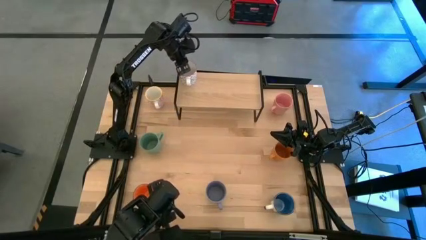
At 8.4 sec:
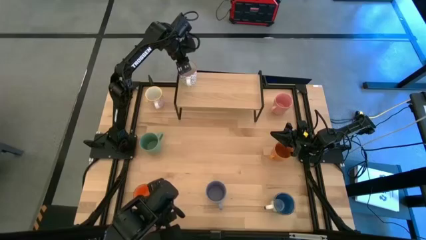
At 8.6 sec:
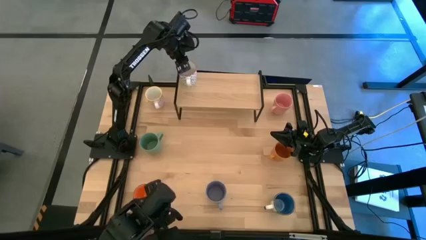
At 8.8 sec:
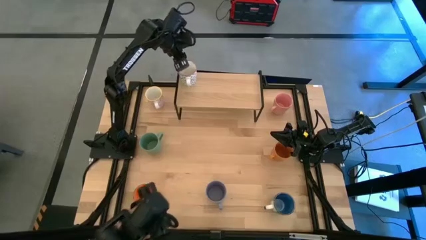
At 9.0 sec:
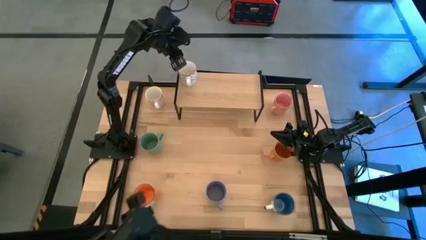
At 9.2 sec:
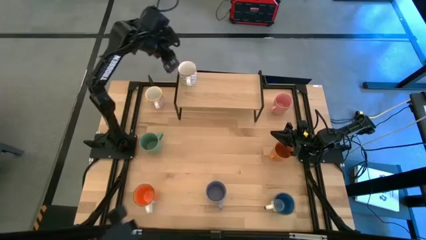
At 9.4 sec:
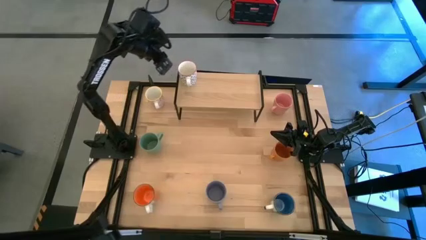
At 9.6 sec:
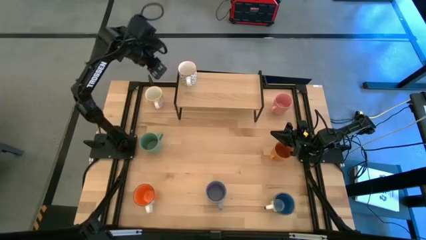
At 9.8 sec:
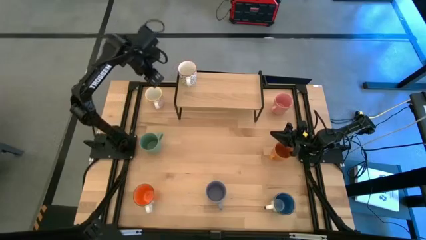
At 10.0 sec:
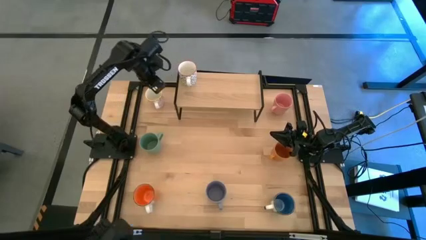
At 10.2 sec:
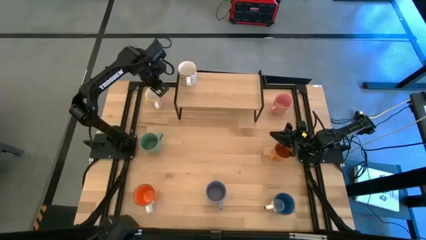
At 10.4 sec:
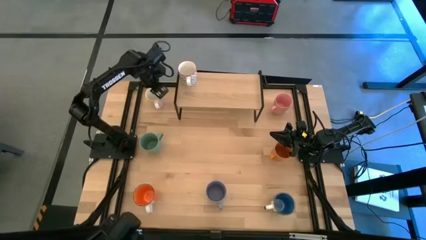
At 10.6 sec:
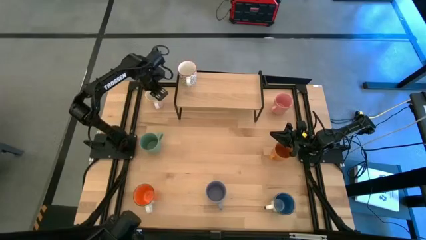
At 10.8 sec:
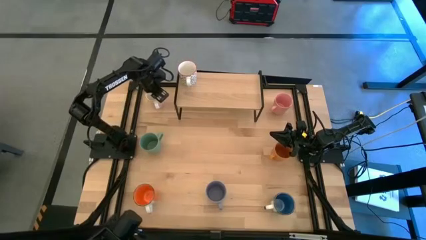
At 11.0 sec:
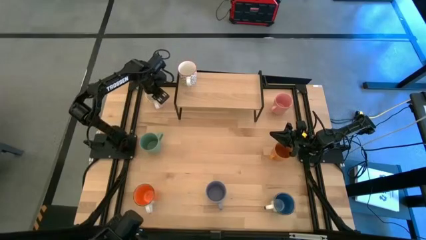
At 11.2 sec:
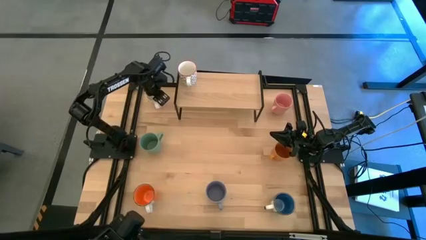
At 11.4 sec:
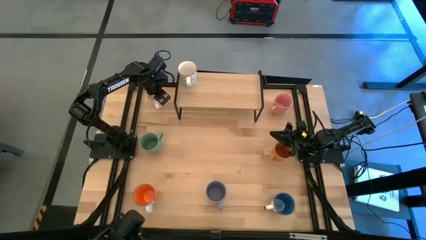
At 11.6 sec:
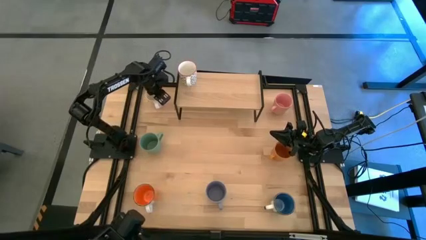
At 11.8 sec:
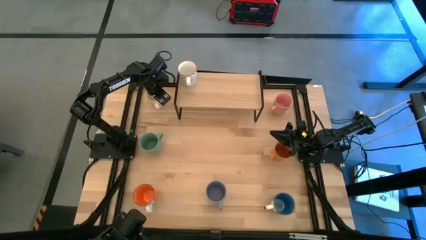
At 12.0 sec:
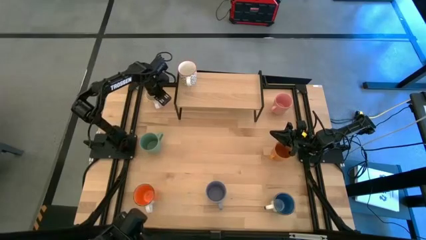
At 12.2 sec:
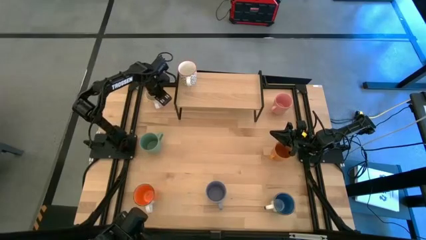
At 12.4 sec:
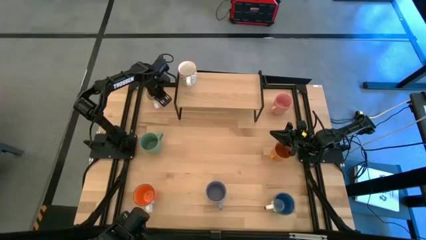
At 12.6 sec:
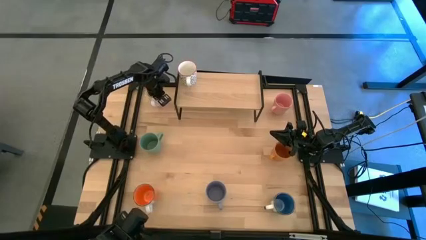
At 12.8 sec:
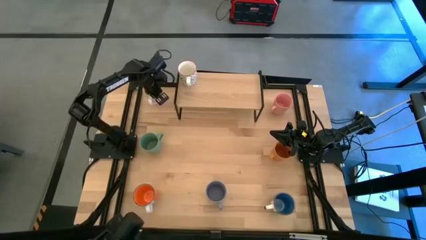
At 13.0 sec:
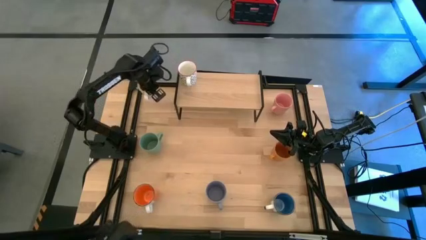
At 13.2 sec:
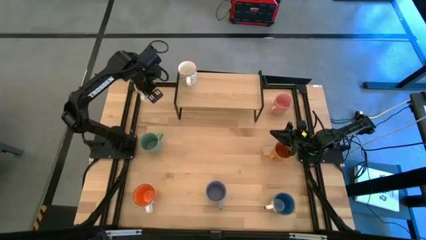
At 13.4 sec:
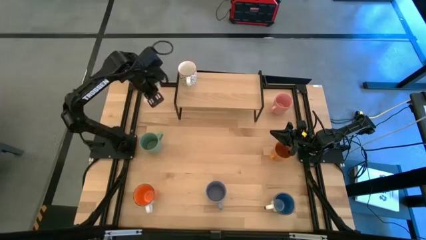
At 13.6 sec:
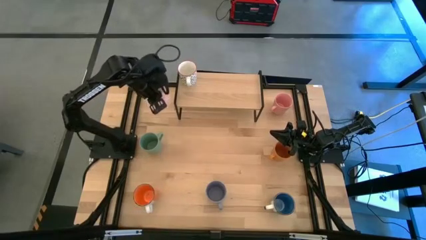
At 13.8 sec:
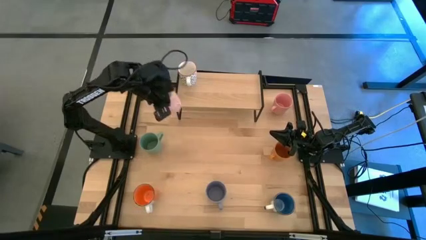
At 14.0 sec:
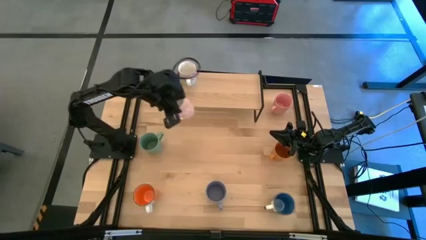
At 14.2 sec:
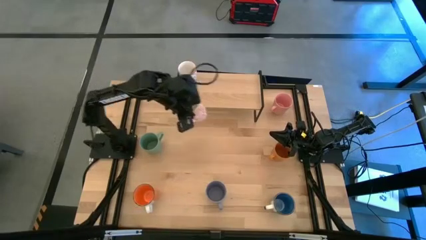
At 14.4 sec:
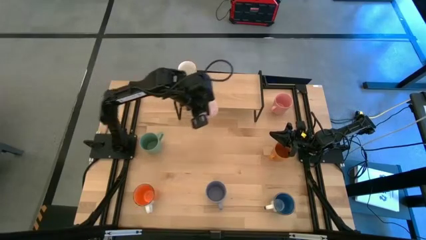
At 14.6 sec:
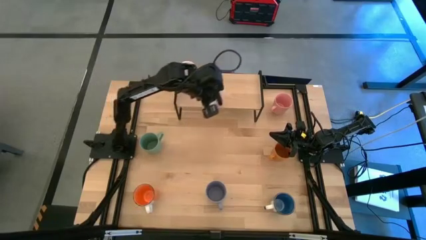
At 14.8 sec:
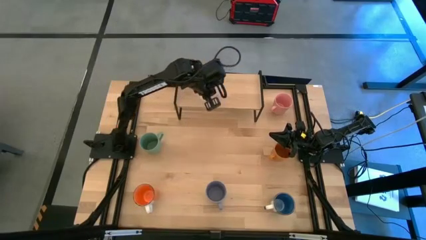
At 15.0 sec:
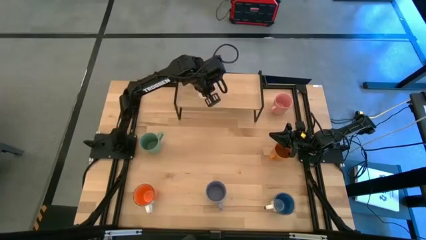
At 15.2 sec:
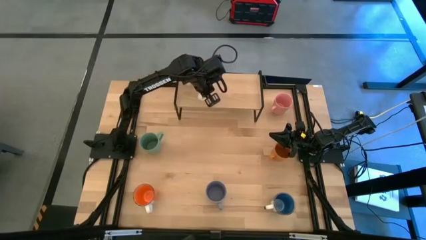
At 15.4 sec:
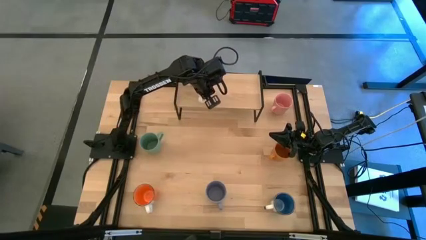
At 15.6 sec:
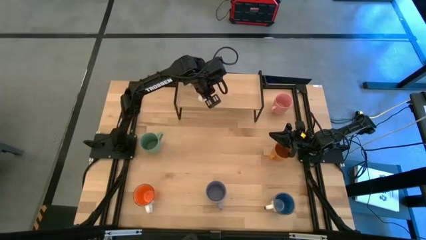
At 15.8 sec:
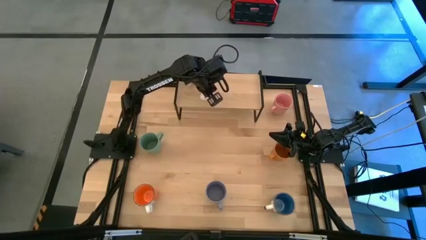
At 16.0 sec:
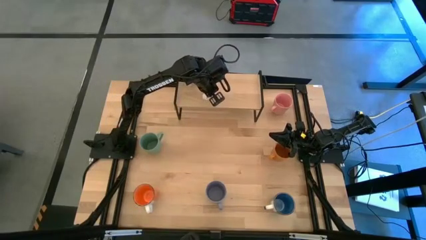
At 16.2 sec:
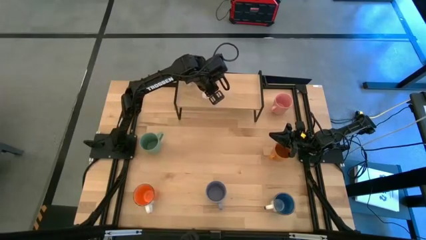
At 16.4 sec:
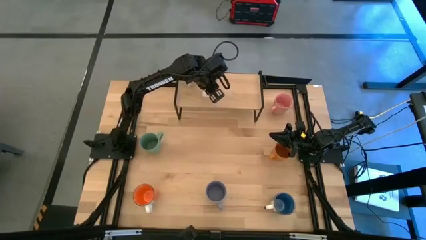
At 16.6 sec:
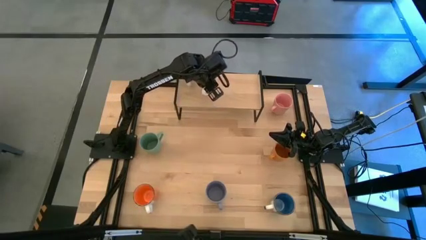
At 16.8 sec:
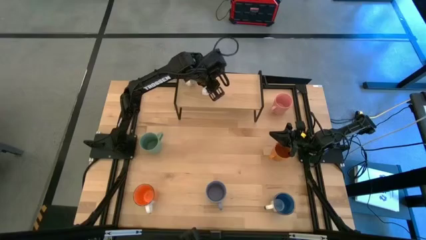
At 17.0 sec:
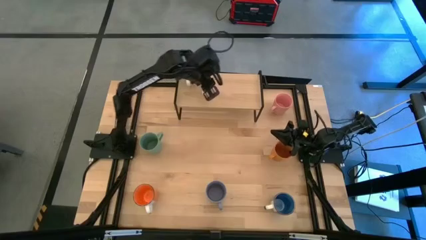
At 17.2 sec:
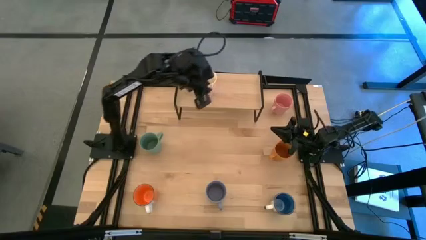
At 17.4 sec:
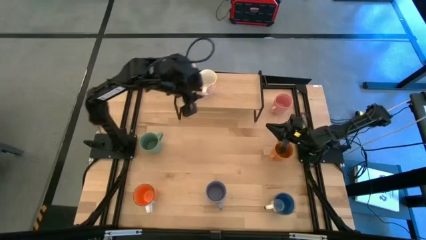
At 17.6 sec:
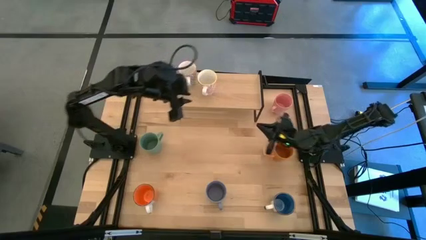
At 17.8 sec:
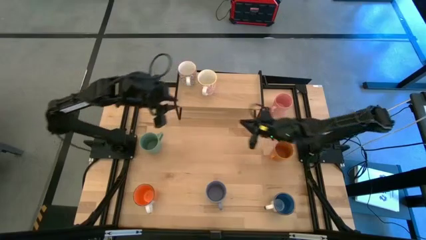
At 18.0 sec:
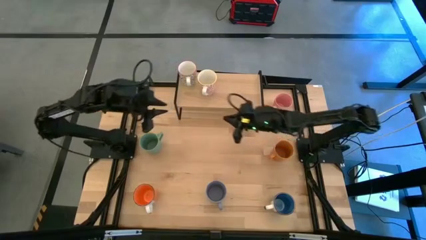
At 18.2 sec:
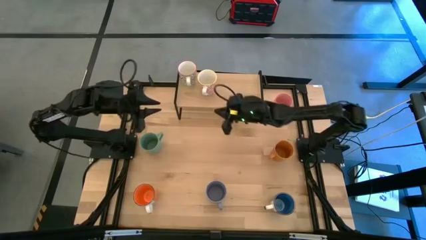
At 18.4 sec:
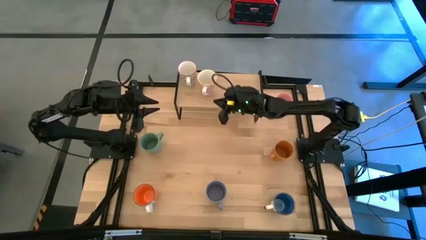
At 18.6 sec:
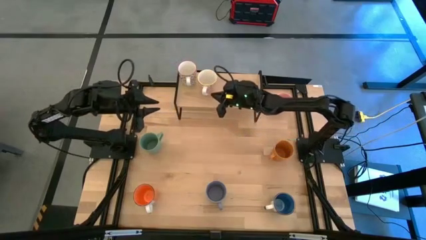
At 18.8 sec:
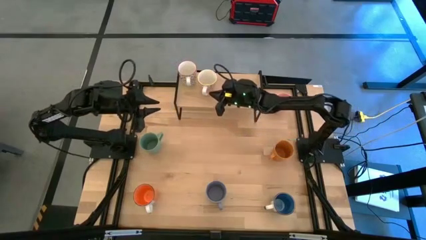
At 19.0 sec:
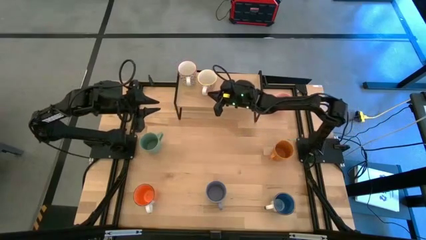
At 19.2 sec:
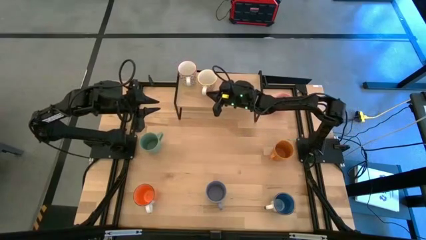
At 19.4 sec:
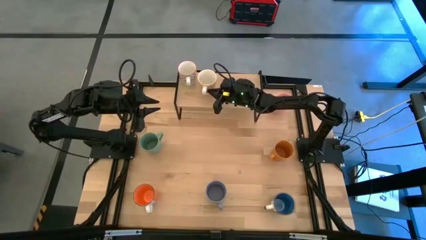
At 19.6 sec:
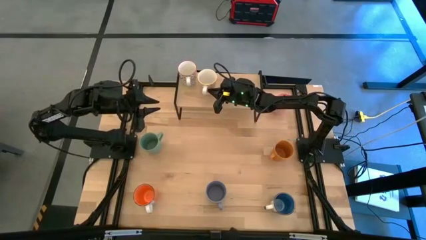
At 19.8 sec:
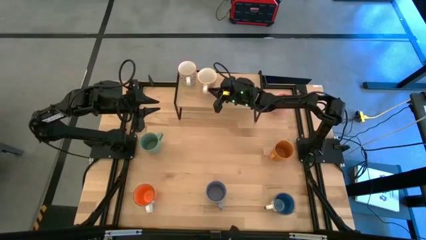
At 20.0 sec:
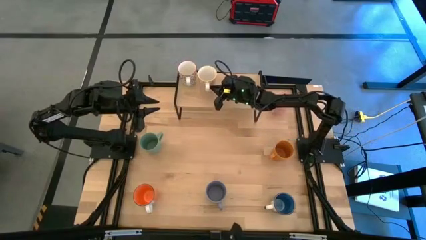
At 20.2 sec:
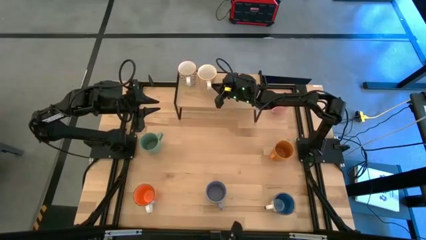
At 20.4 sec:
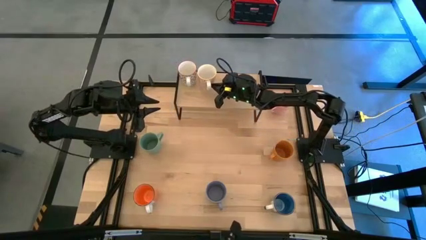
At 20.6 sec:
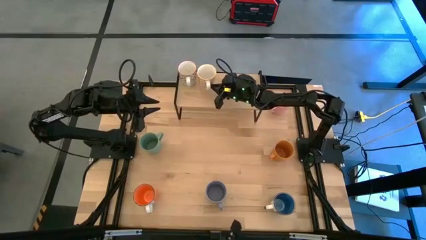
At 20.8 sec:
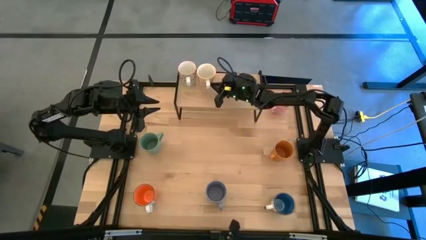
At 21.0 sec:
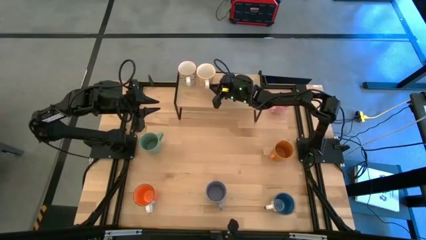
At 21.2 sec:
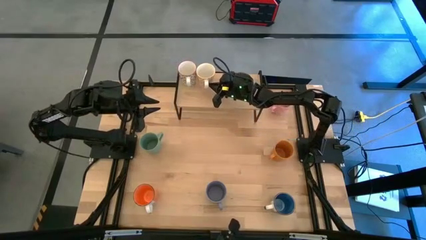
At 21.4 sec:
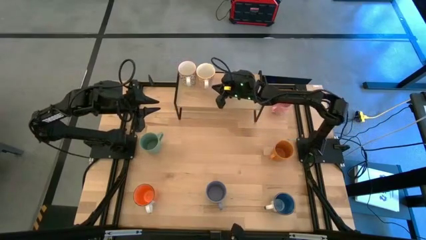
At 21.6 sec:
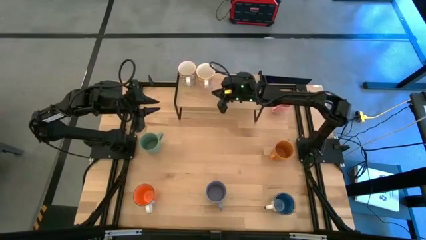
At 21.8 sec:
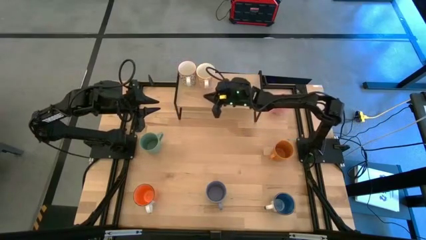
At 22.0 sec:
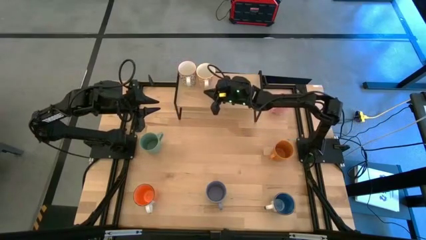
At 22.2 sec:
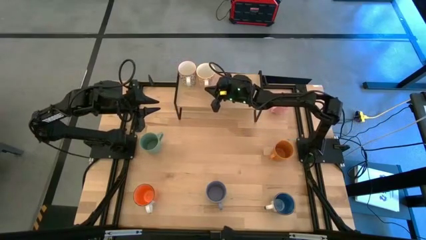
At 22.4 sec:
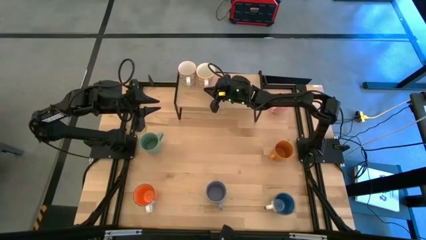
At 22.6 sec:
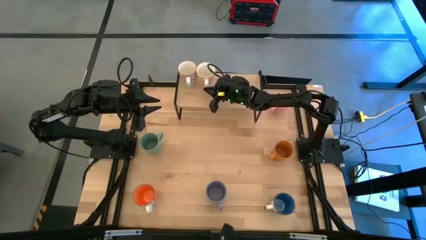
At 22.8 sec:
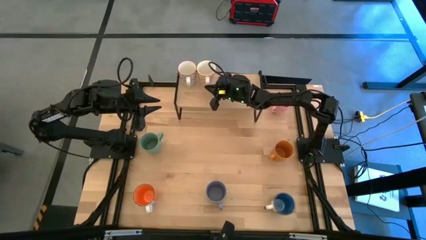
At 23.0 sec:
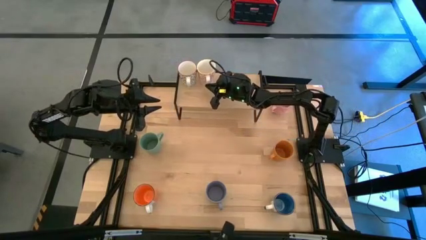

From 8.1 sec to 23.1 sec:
Task: Place coffee mugs
Put the red patterned mug on the shelf

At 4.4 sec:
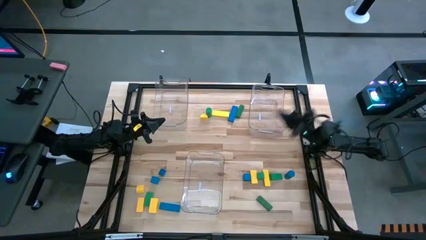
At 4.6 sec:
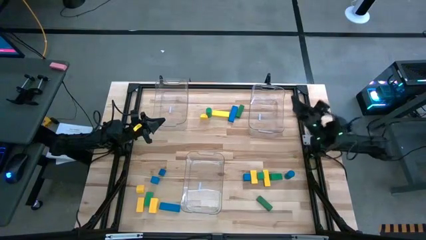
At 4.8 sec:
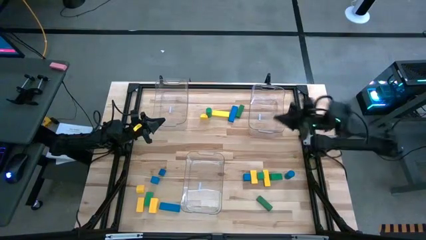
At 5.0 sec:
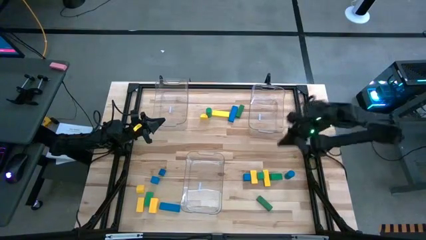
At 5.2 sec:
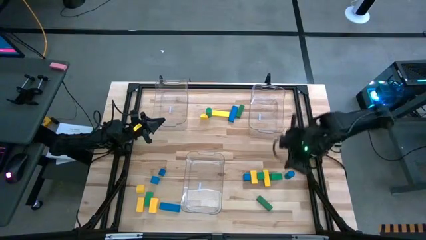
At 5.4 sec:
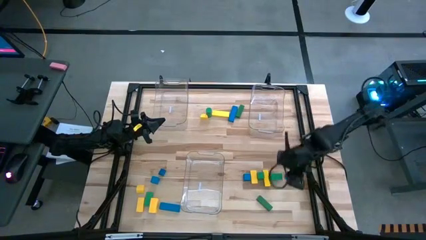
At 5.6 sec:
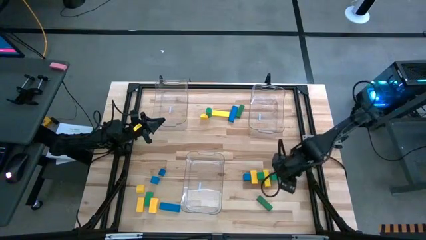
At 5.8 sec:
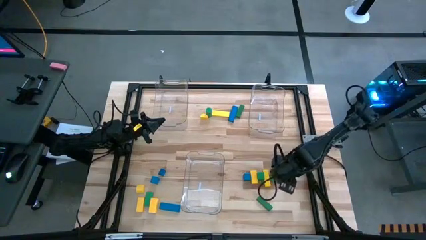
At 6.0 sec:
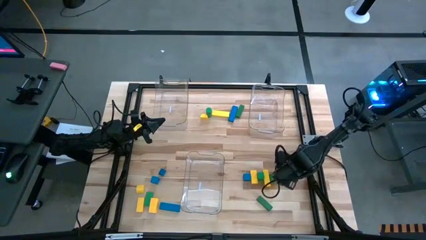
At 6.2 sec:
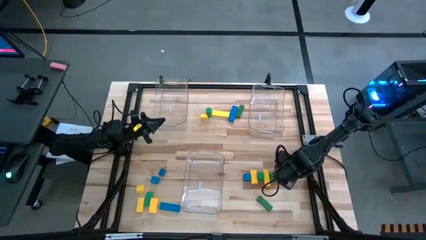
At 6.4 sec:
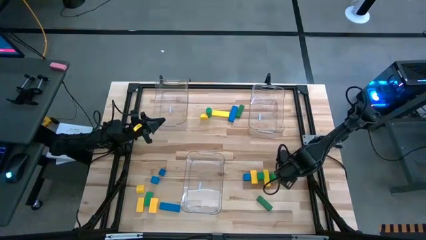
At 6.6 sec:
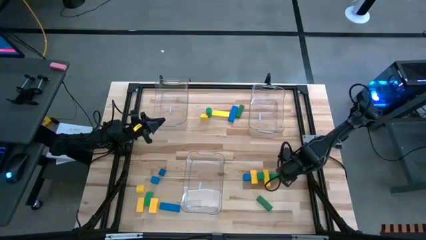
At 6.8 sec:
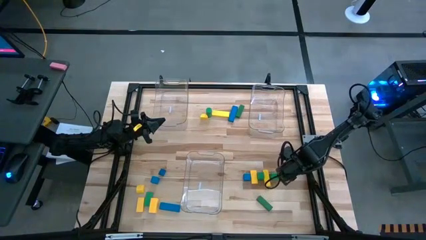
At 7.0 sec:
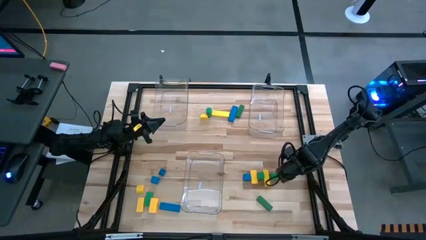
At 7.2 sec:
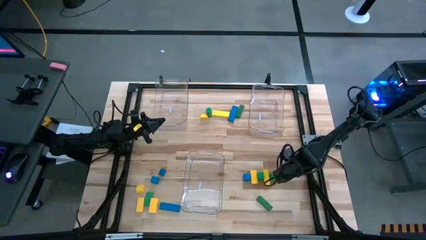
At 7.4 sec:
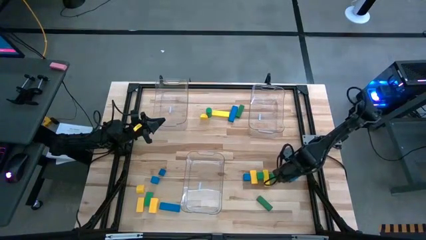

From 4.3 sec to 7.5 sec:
Task: Sort blocks
Put the blue block into the top right transparent bin
